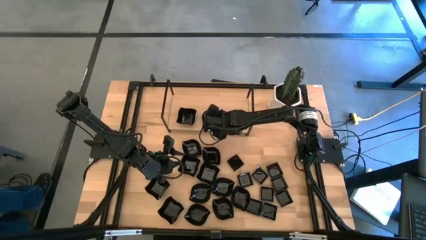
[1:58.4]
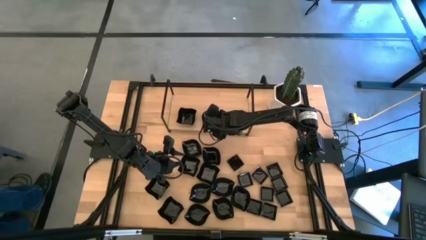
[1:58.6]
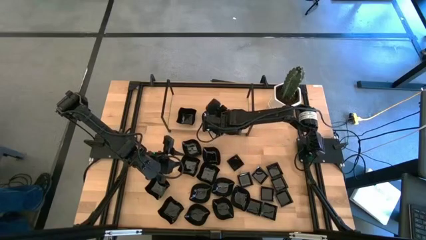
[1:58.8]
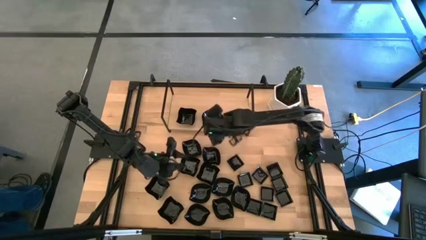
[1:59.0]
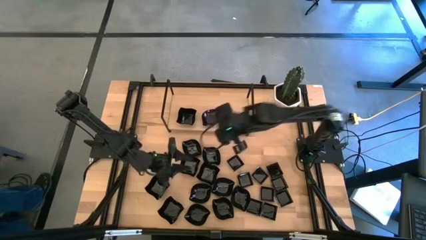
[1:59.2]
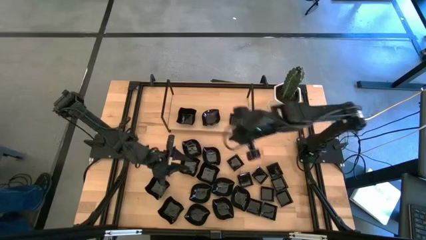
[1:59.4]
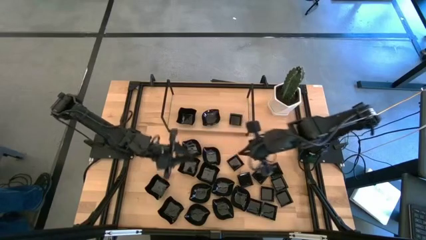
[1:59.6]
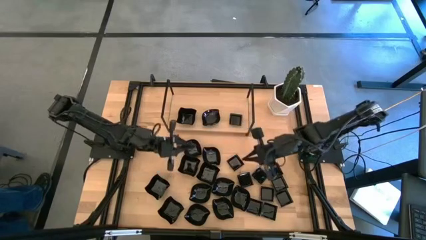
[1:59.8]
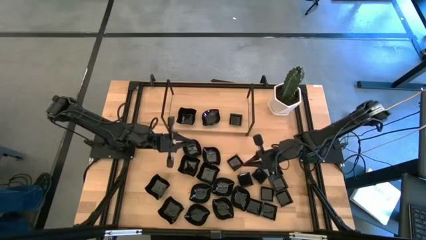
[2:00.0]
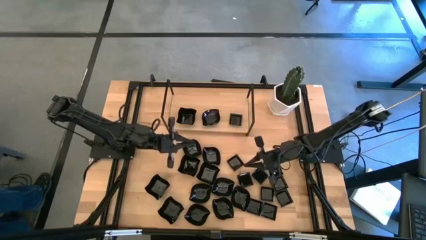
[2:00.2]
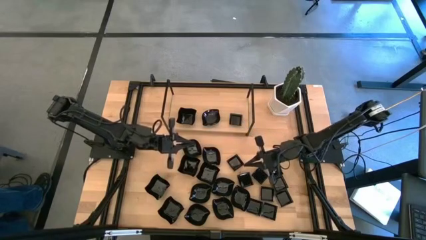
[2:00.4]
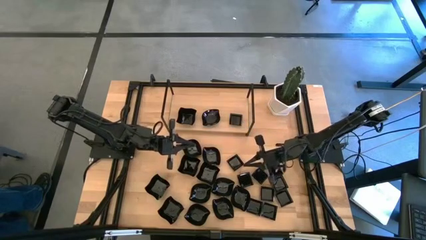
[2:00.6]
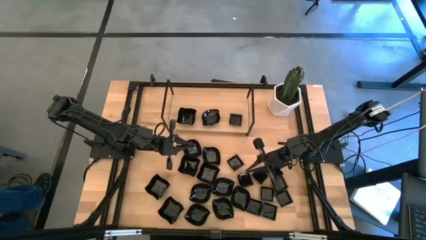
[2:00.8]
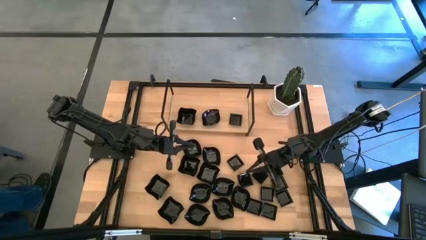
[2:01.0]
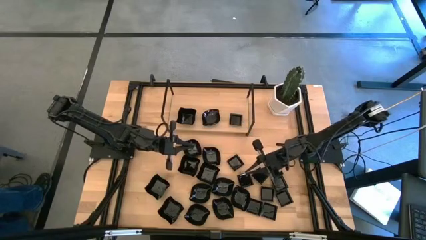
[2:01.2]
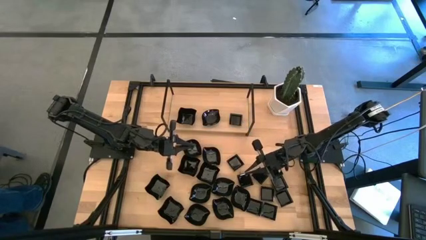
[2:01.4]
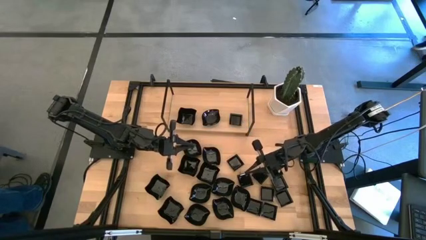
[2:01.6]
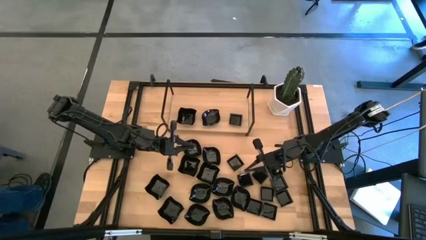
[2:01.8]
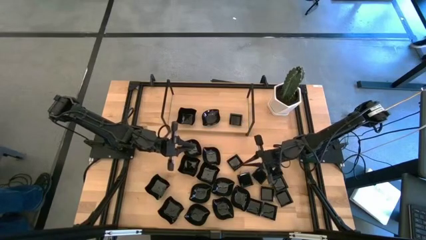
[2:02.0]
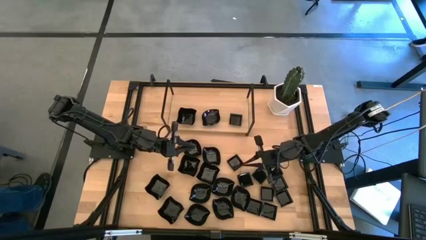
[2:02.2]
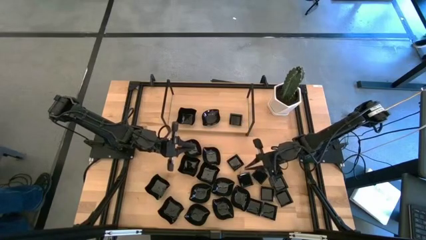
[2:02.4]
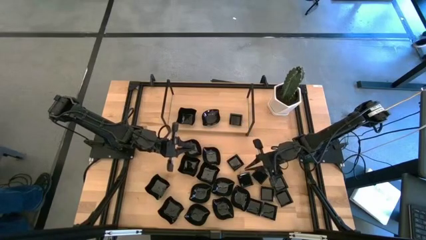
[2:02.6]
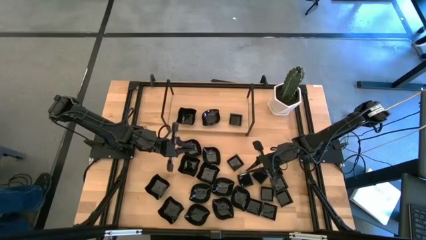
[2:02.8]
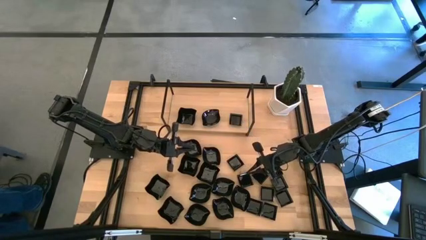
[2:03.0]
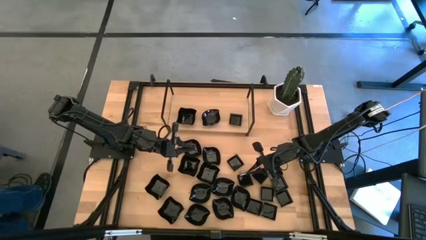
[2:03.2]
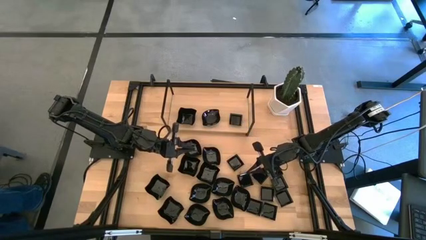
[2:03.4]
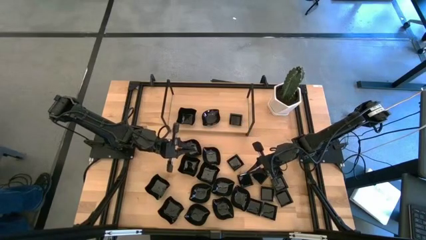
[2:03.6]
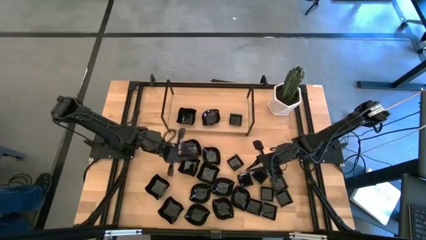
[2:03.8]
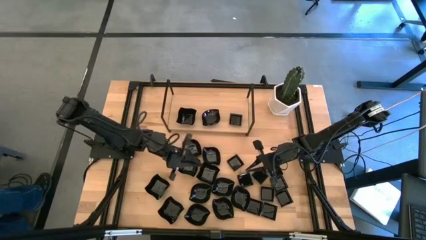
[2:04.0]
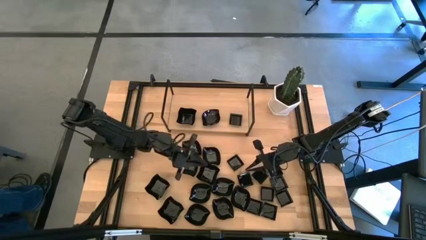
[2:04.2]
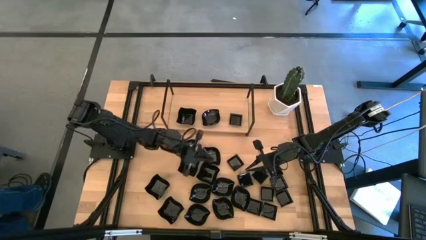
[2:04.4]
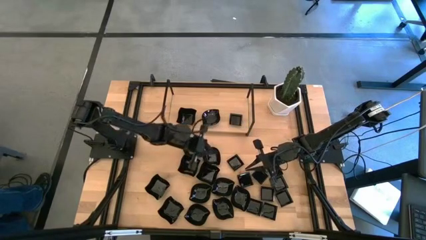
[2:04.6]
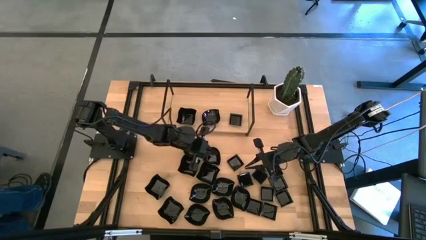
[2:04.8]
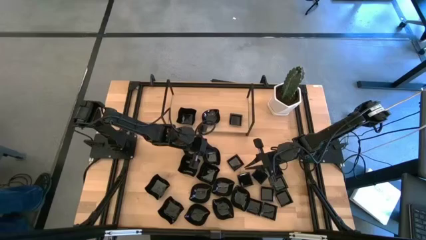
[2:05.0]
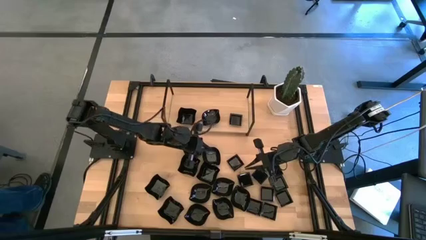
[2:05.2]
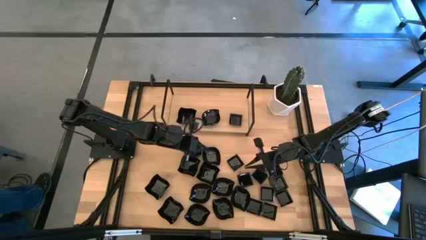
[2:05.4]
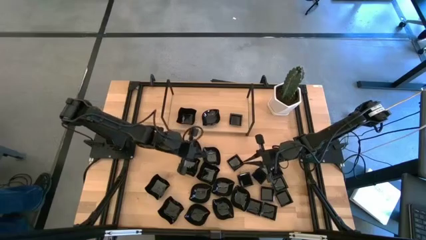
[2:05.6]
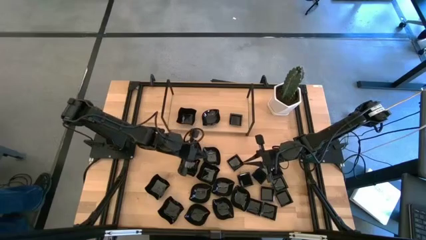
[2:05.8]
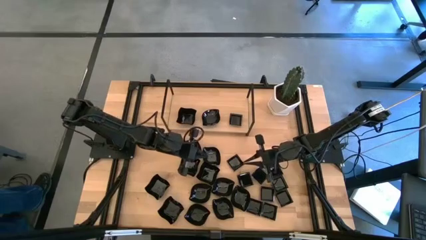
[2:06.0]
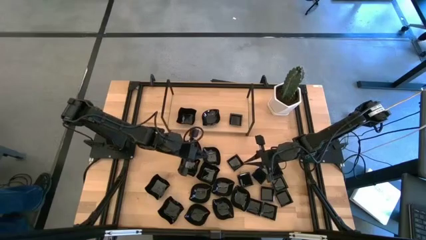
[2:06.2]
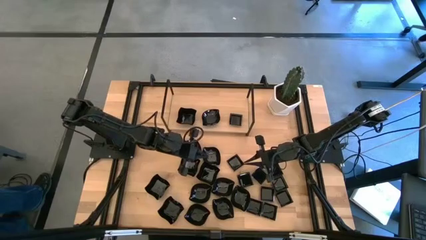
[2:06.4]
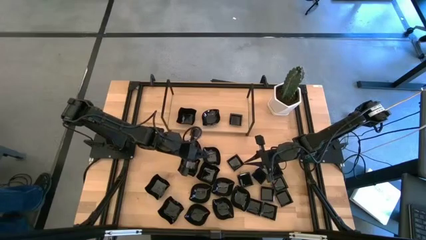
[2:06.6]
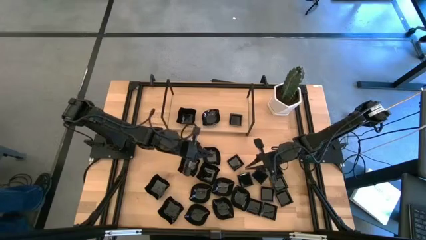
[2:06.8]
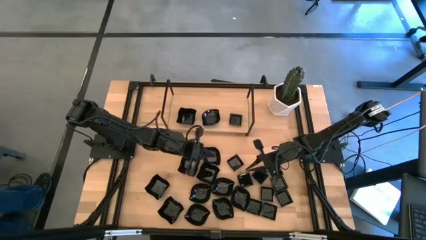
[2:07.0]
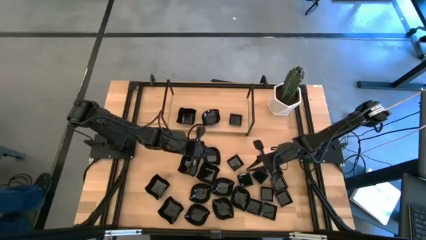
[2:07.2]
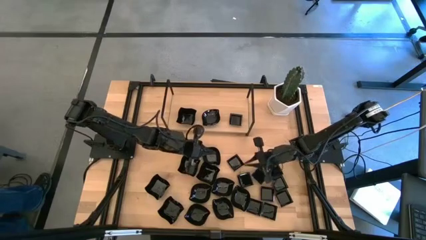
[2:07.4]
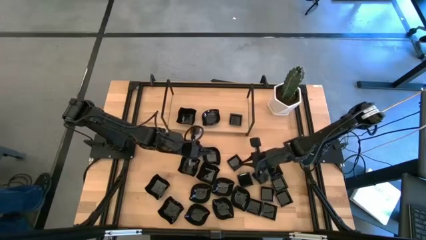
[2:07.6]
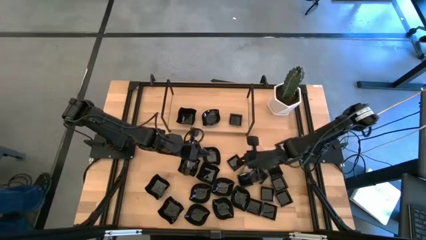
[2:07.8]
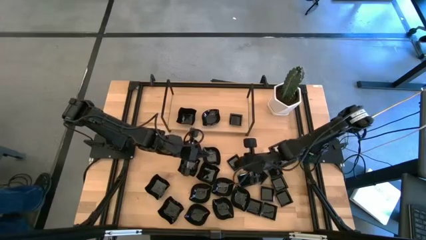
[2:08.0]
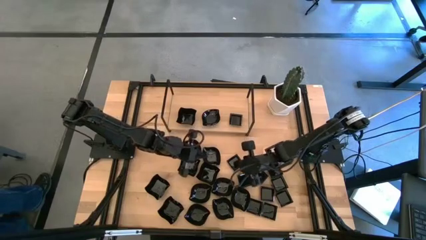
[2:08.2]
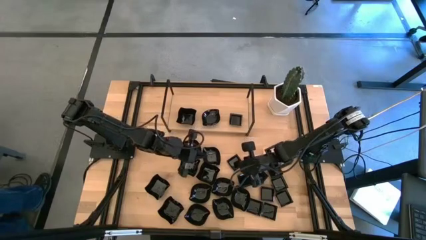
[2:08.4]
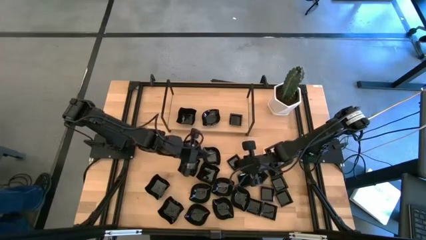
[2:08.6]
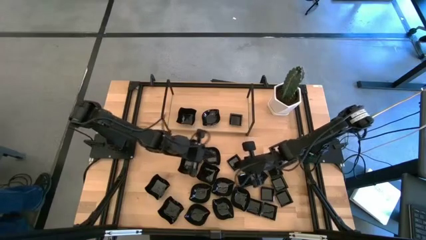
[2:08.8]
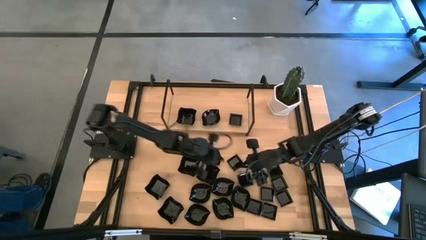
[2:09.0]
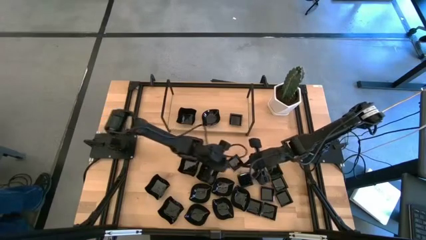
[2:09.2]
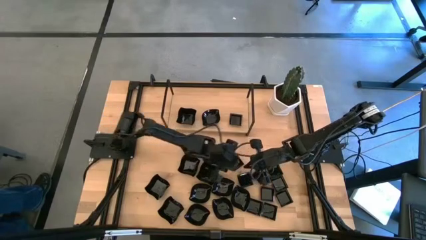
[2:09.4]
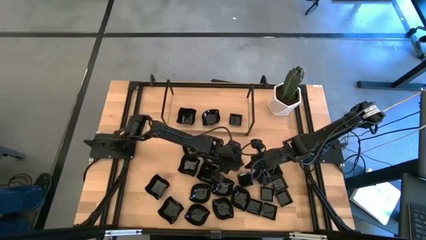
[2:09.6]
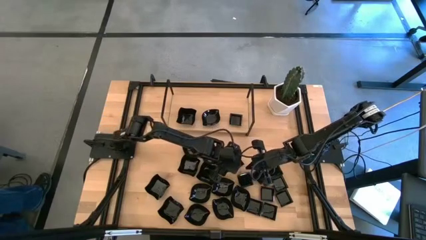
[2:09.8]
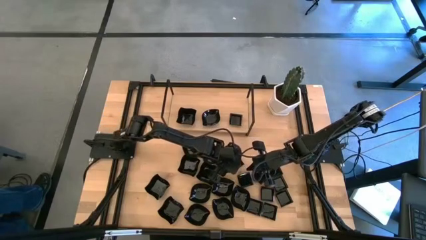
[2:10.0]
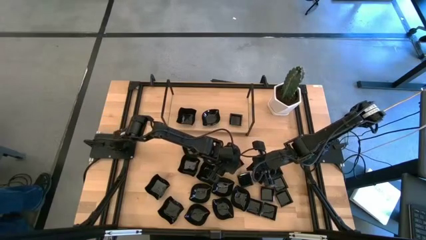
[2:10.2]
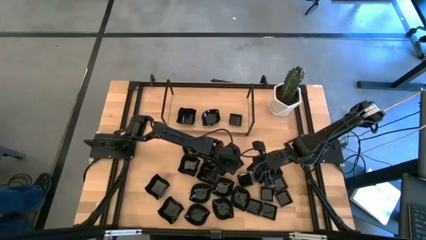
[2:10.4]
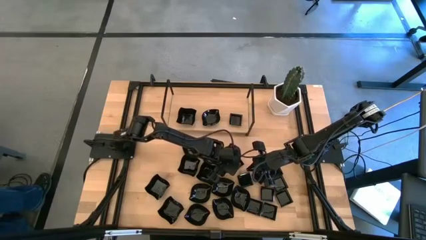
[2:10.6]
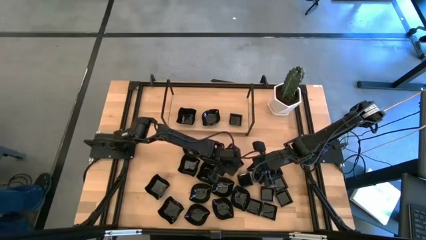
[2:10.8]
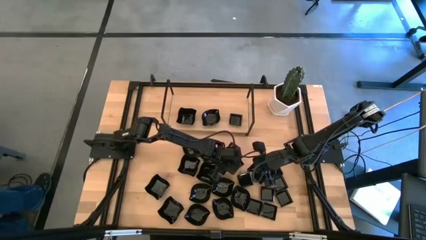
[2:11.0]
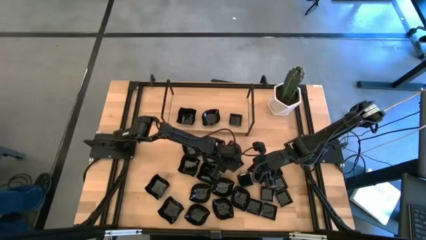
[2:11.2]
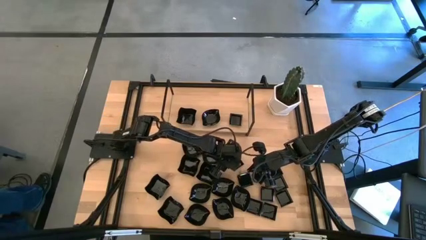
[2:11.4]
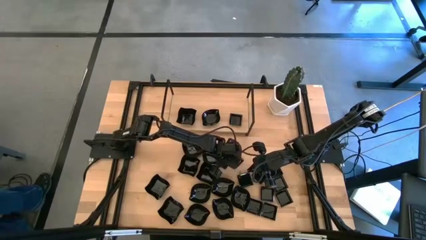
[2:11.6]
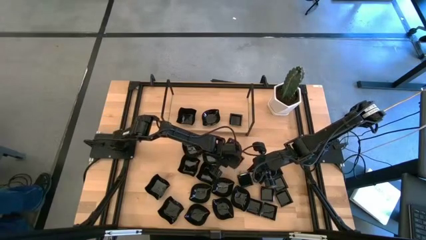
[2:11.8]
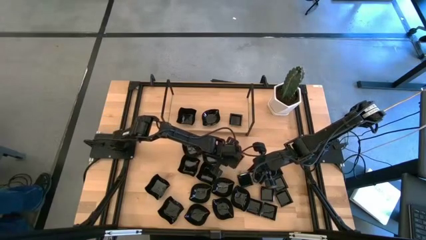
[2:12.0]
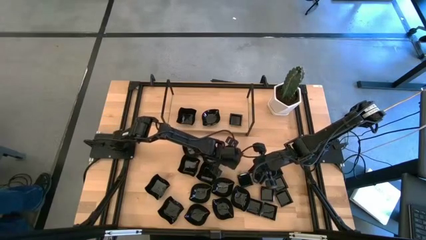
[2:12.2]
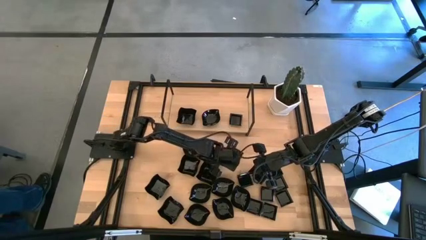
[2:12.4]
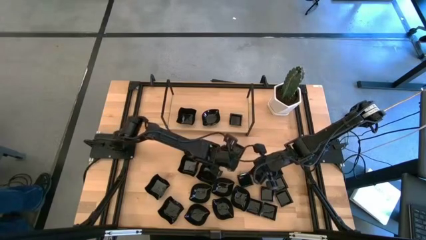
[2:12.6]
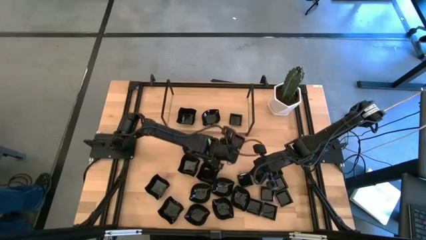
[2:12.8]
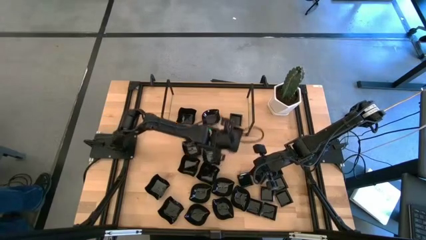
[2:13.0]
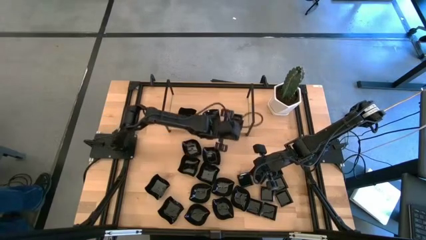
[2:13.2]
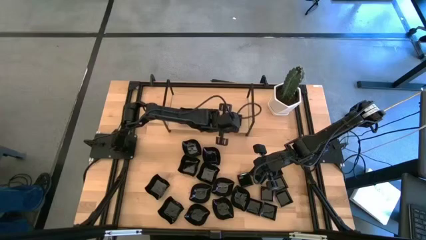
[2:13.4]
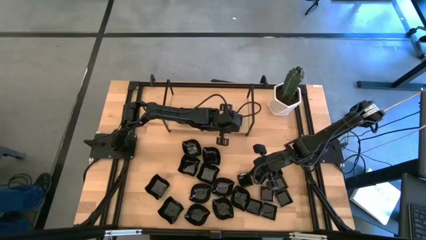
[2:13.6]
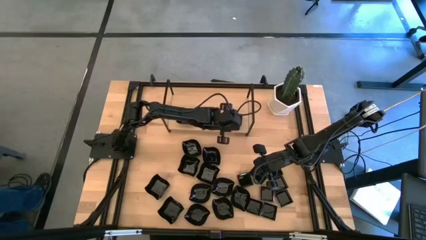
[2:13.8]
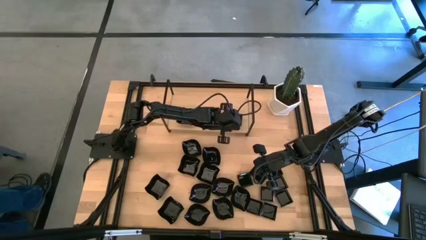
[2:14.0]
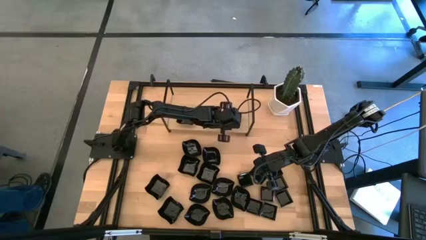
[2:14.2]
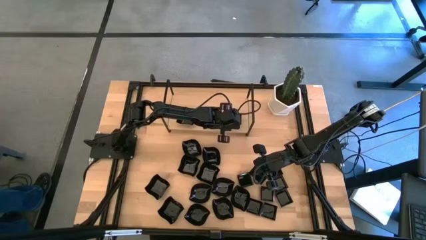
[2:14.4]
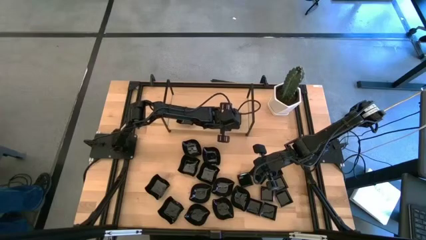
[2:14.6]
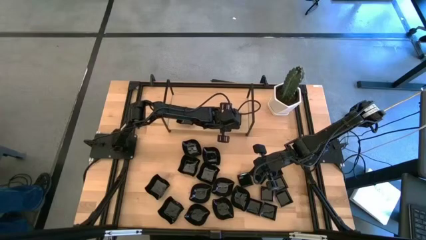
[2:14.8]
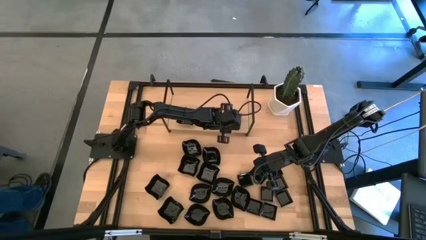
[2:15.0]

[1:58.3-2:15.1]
Task: Pick & Place Mini shaped plates
Stack the square plate on the top of the square plate on the shelf
